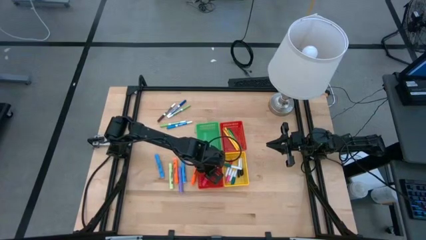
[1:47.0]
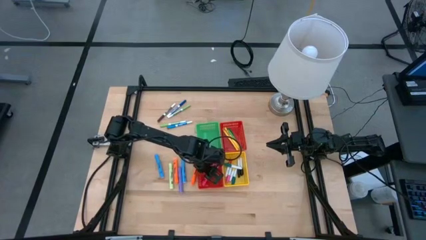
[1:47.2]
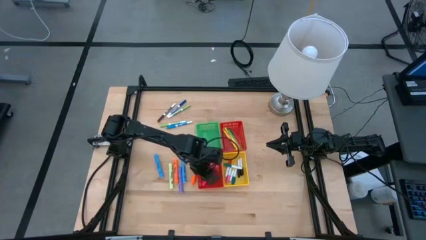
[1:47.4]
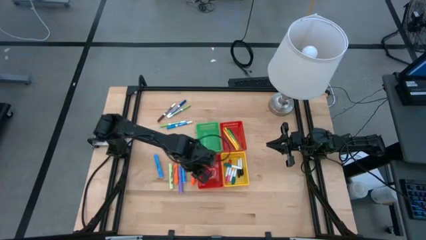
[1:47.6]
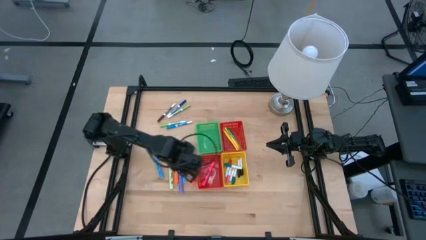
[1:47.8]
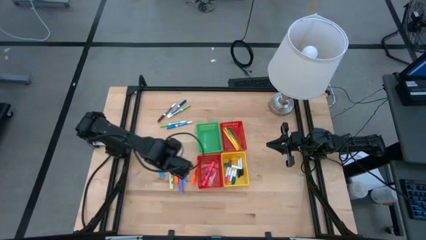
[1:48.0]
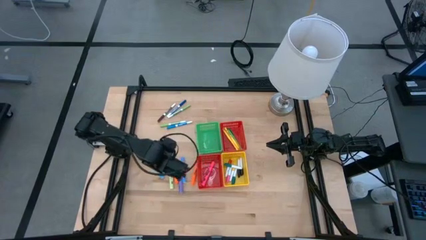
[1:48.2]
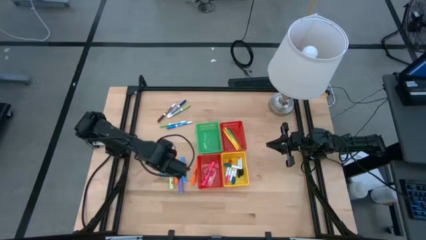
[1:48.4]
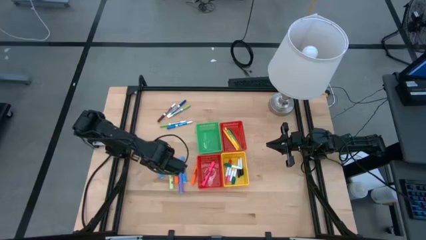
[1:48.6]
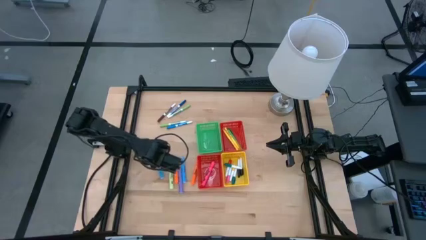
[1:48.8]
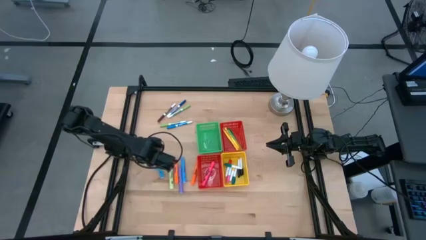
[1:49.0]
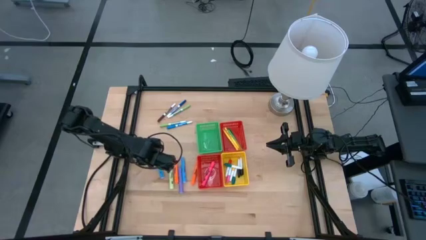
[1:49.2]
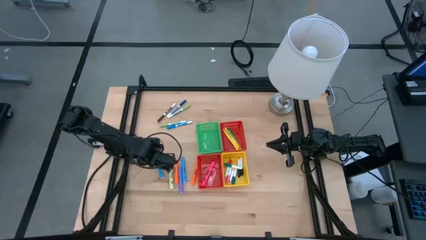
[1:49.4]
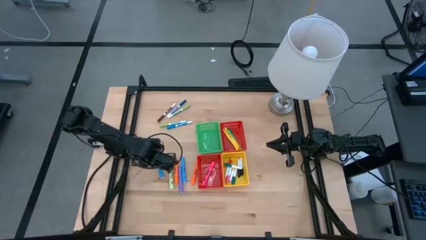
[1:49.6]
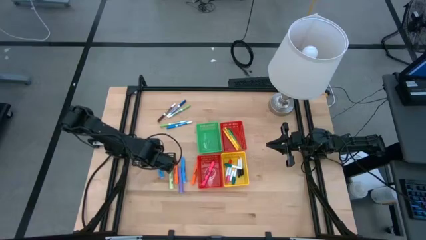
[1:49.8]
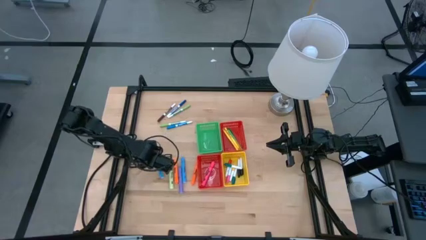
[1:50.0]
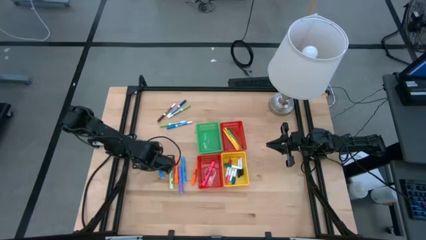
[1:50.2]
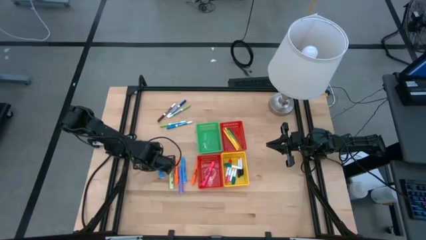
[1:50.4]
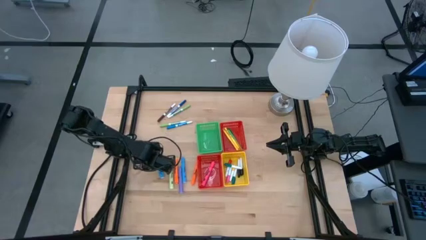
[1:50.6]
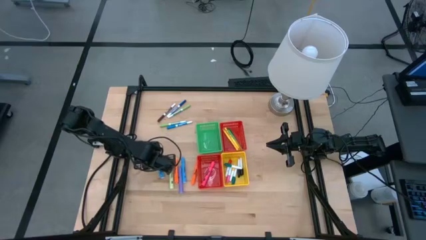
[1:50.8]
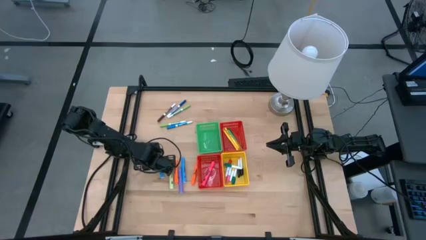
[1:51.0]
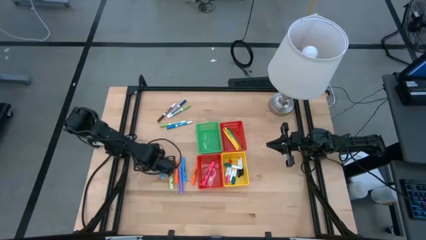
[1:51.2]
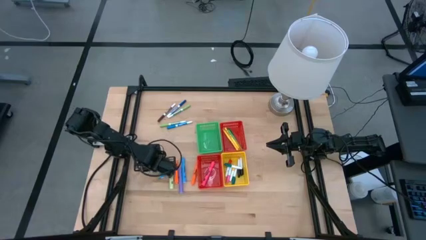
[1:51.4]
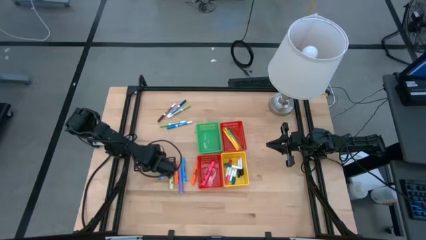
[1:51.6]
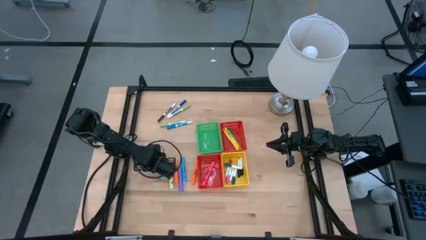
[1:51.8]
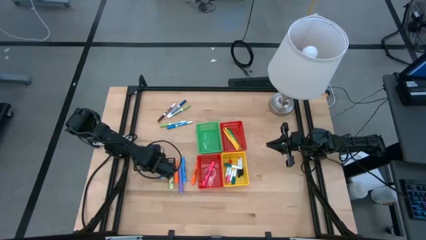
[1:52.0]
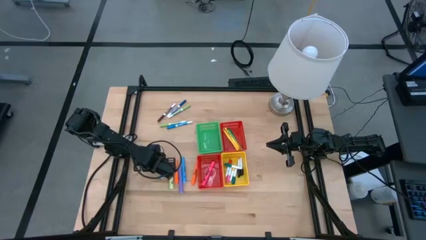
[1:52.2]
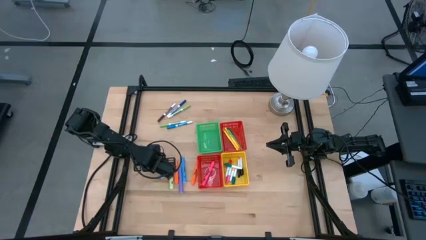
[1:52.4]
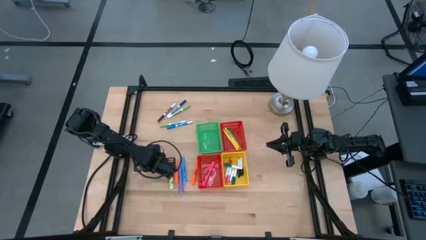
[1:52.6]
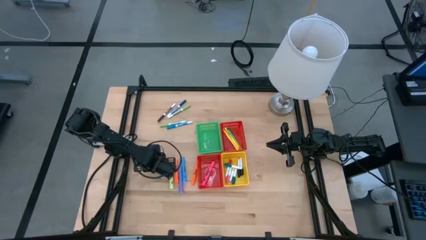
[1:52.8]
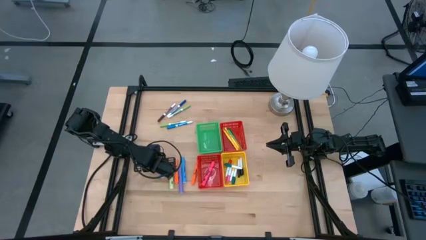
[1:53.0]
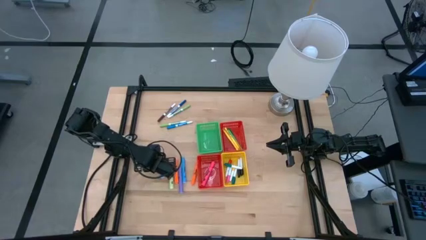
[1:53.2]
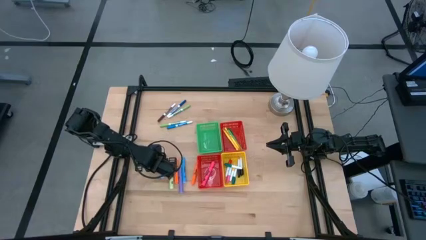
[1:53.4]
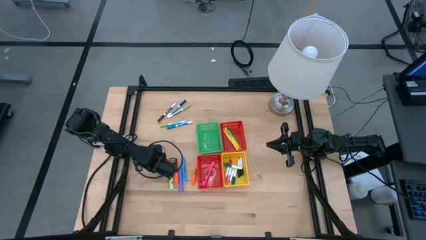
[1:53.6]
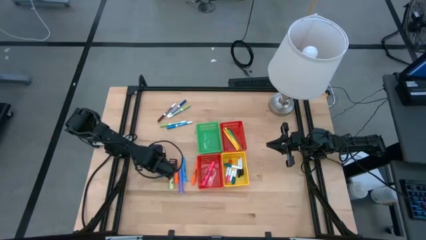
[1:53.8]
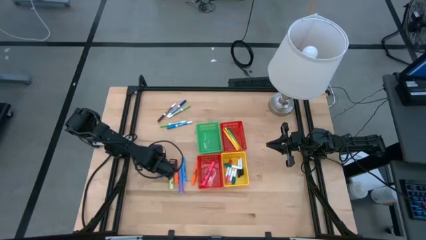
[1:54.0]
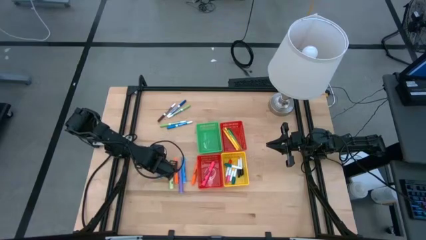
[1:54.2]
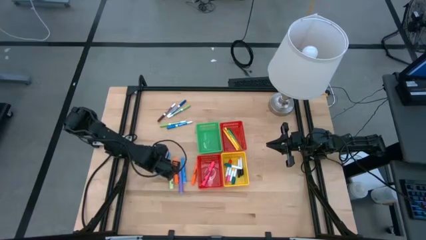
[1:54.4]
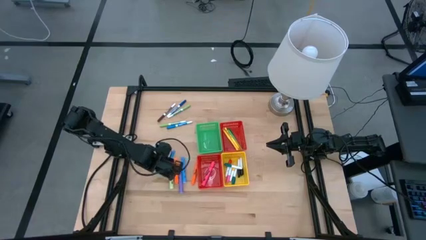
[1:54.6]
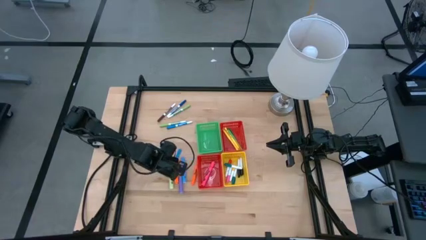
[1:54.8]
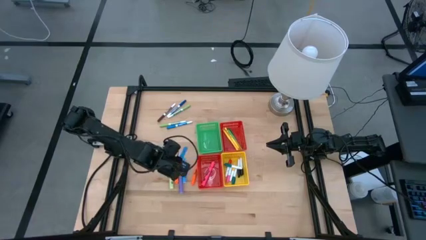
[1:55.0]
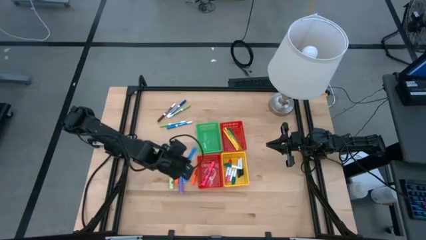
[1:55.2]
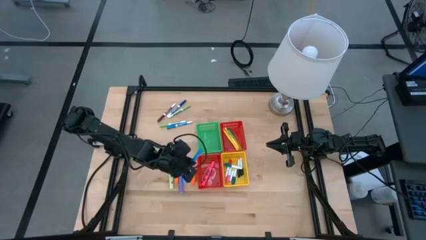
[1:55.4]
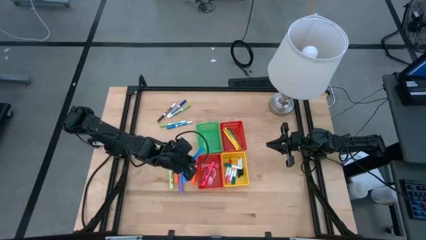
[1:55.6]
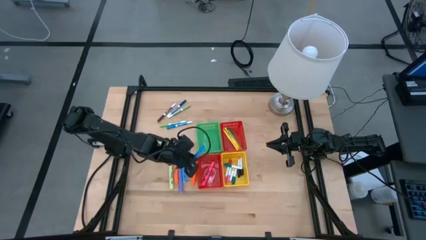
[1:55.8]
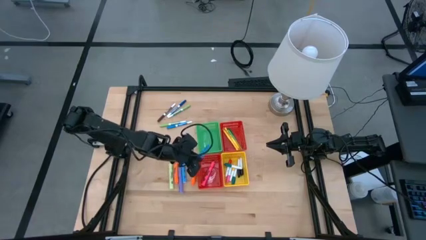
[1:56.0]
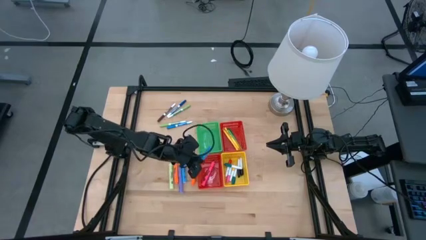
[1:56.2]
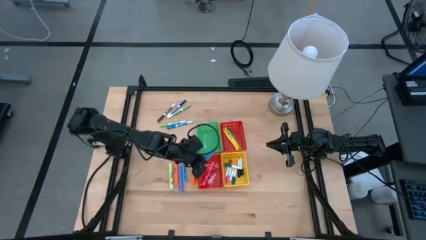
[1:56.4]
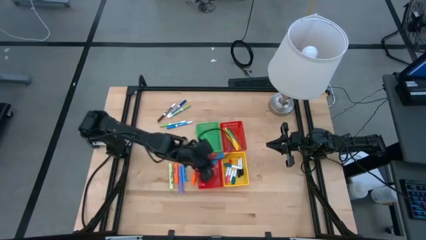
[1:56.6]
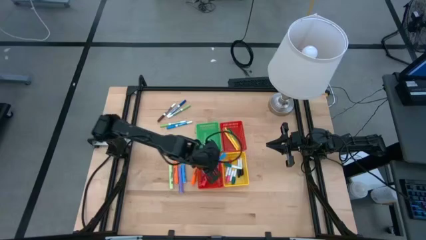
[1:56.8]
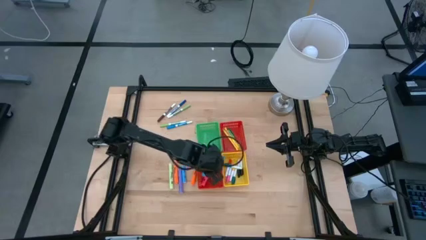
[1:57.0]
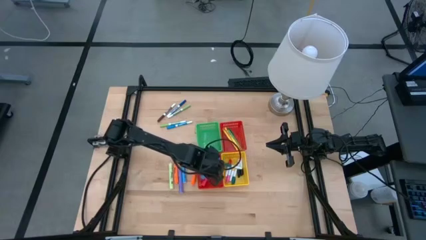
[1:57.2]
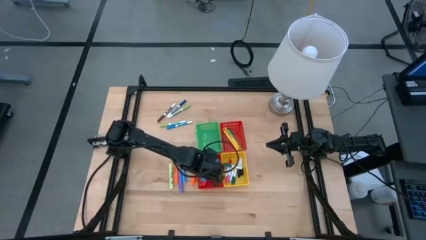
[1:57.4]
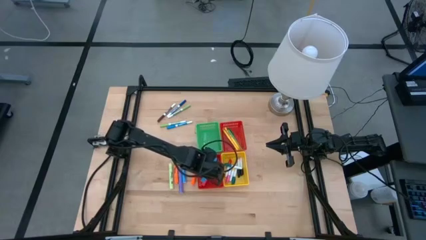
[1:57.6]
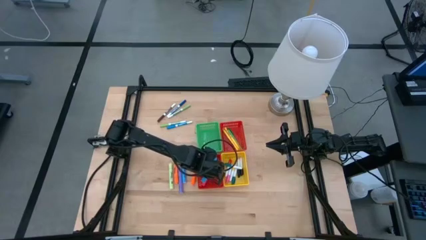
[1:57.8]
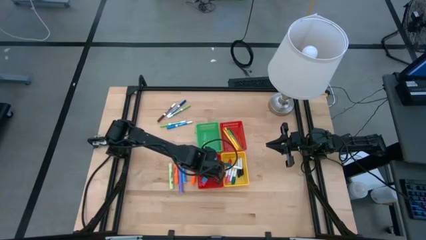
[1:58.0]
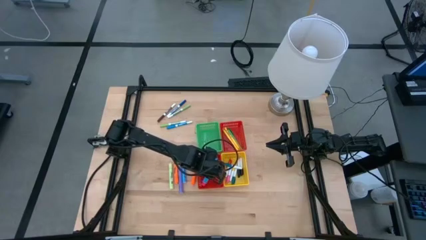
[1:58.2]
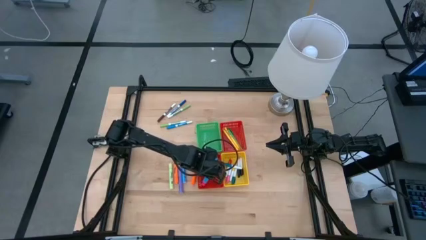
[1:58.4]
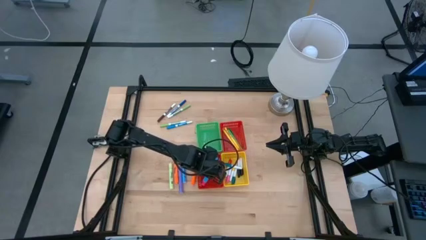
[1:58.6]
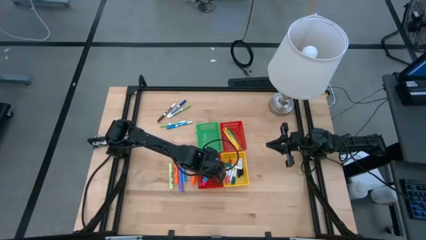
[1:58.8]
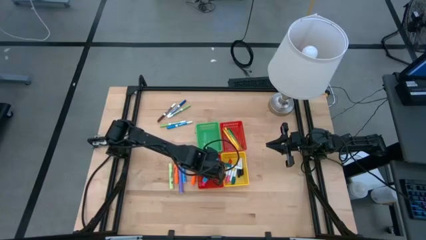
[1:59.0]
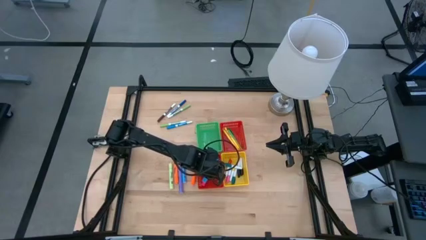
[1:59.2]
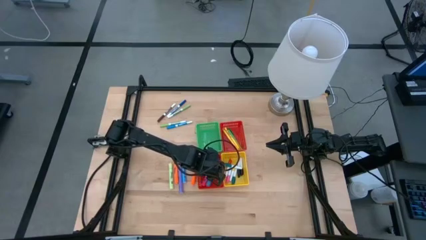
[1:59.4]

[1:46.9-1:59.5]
Task: Pick & Place Markers
Put the large blue highlighter into the bottom red bin

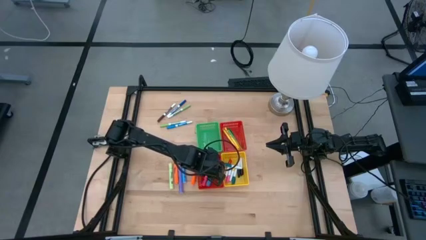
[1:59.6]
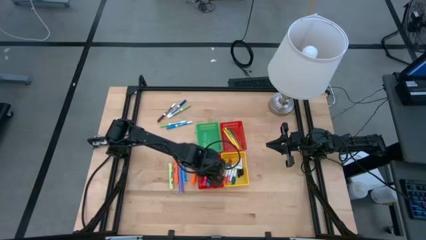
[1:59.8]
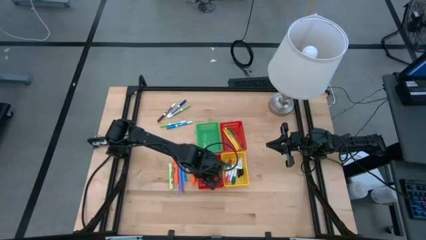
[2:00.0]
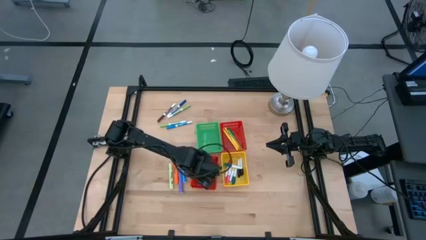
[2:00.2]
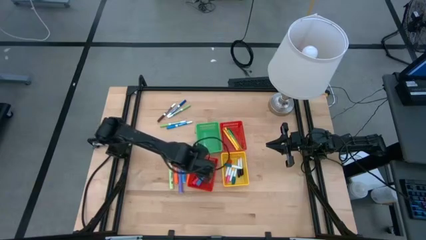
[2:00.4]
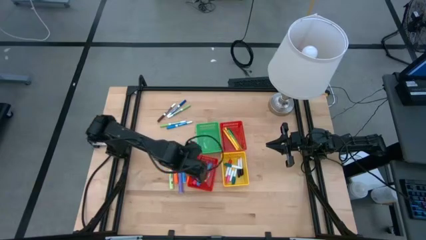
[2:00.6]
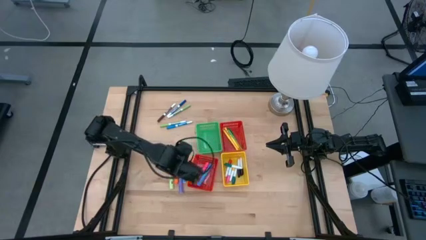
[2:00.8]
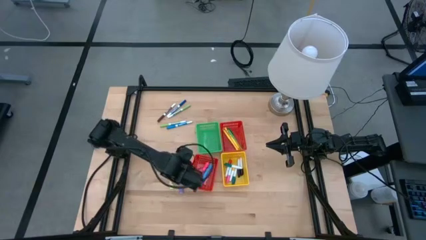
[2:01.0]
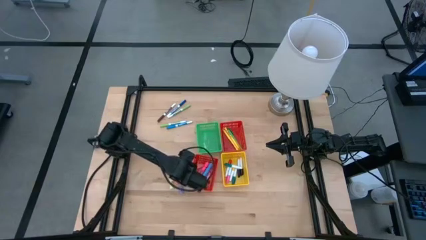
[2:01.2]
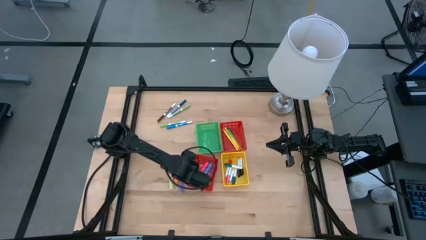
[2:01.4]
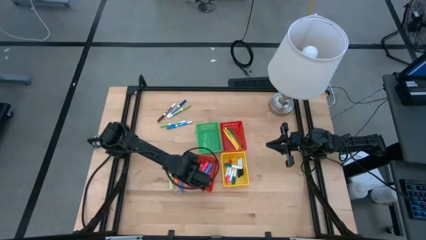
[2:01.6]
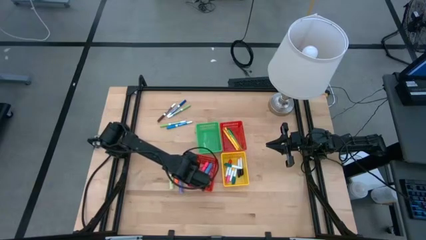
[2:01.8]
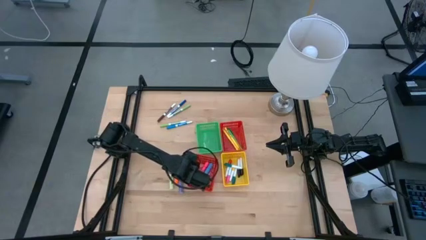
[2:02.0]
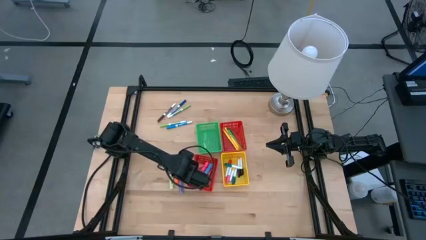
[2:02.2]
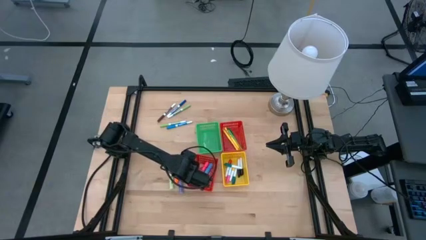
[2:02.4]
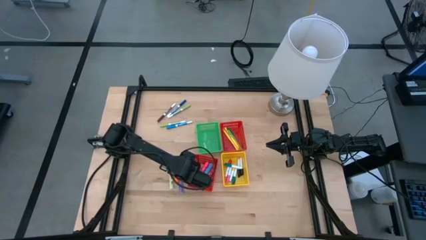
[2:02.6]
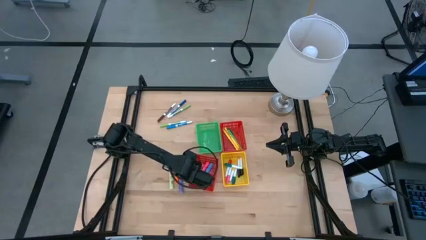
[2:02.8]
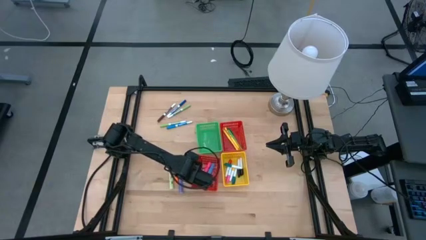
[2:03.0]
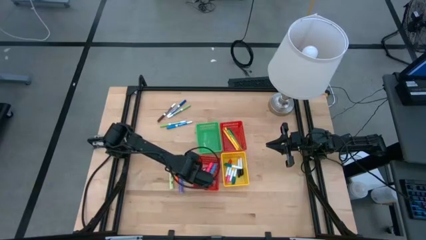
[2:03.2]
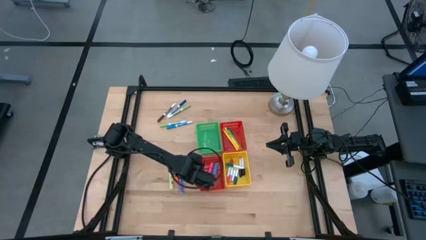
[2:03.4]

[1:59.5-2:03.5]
Adjust the bottom red bin
